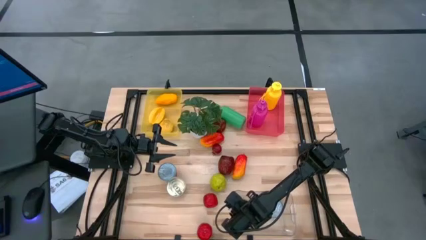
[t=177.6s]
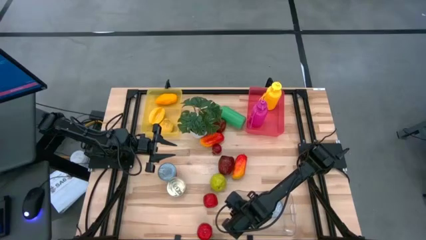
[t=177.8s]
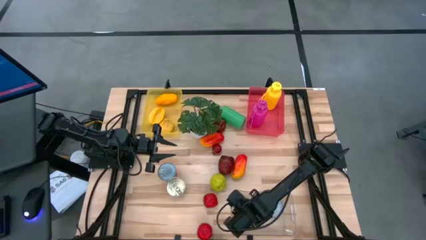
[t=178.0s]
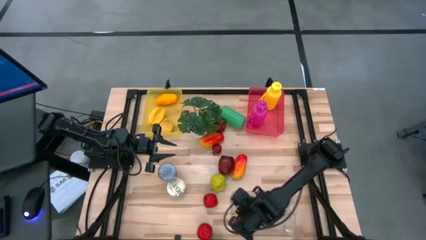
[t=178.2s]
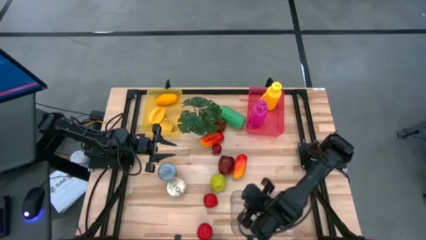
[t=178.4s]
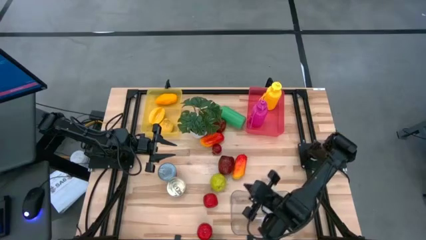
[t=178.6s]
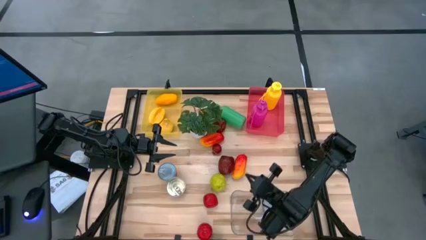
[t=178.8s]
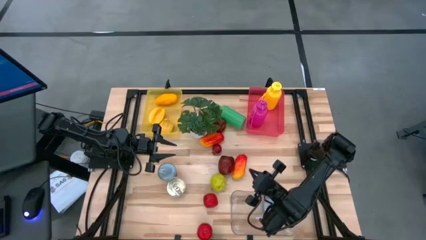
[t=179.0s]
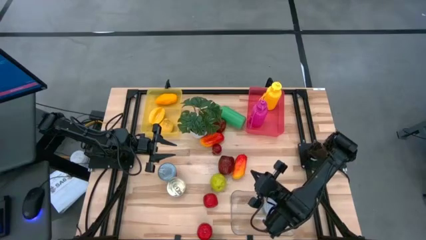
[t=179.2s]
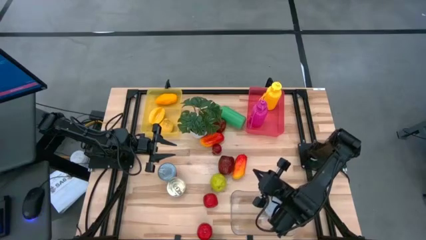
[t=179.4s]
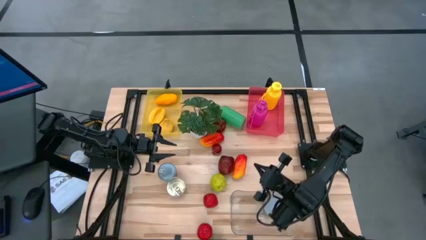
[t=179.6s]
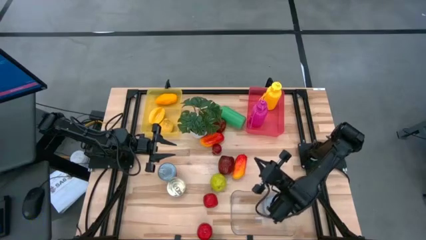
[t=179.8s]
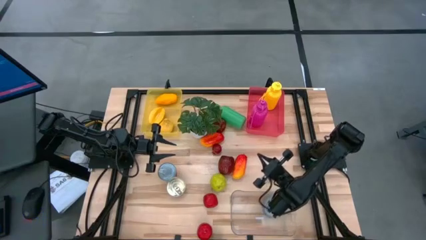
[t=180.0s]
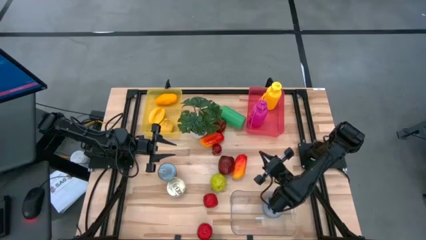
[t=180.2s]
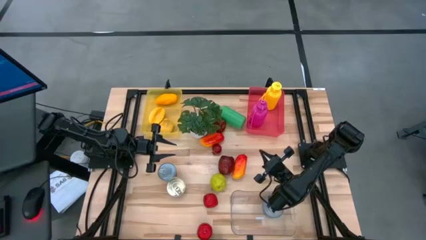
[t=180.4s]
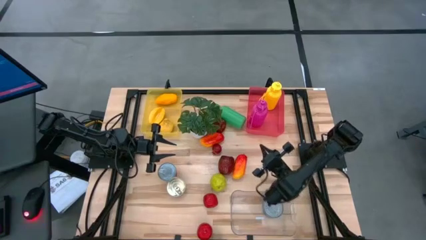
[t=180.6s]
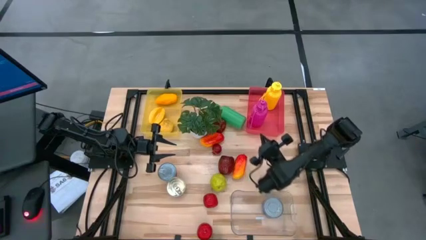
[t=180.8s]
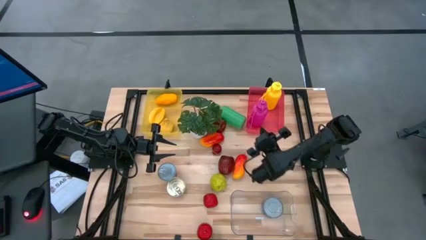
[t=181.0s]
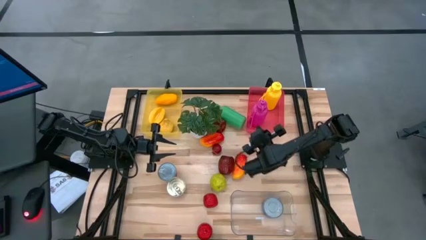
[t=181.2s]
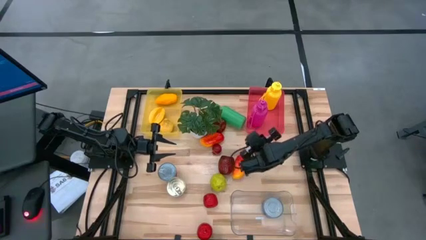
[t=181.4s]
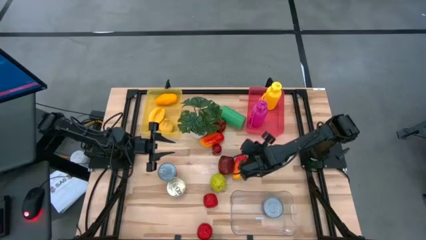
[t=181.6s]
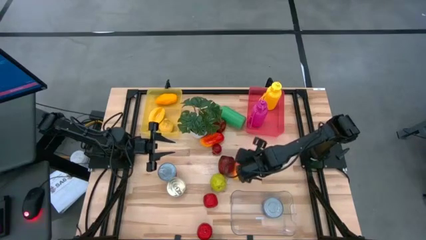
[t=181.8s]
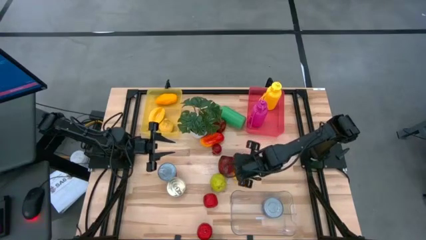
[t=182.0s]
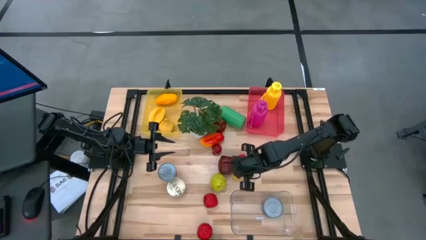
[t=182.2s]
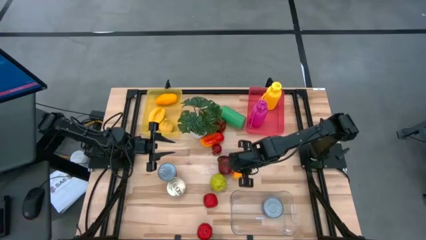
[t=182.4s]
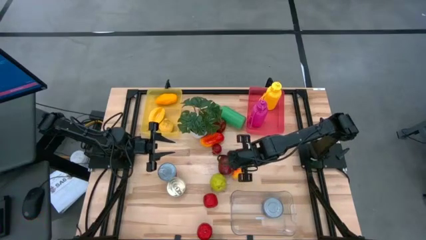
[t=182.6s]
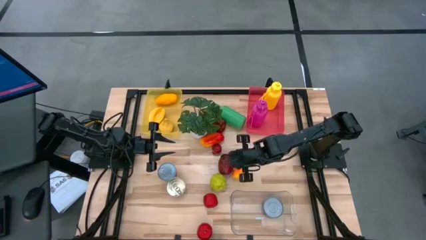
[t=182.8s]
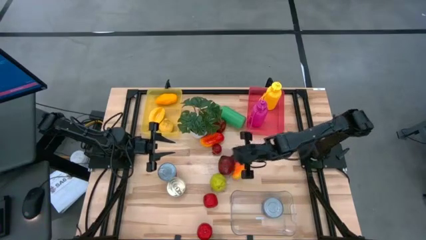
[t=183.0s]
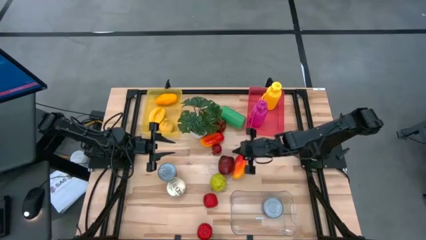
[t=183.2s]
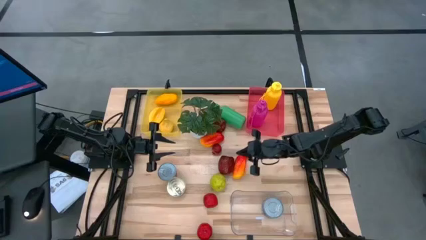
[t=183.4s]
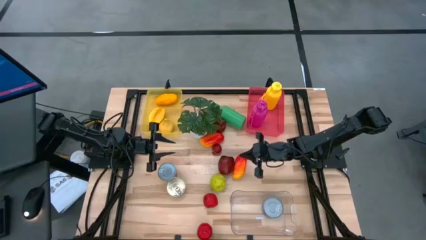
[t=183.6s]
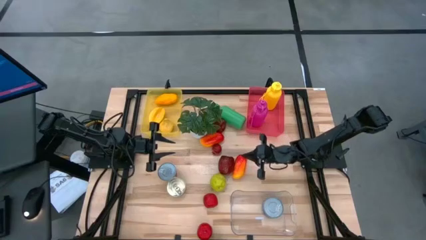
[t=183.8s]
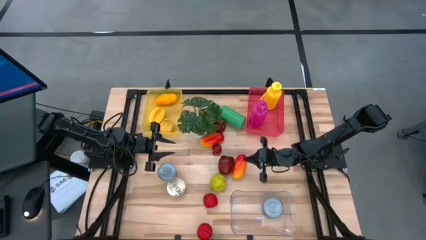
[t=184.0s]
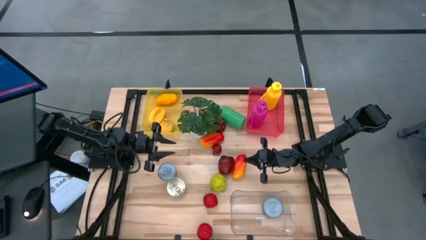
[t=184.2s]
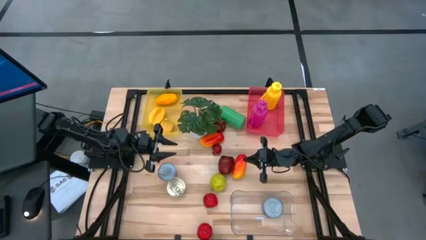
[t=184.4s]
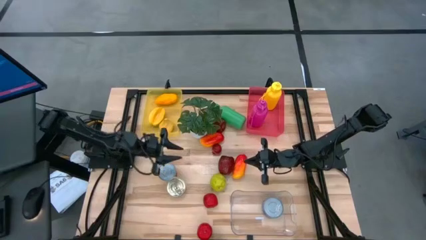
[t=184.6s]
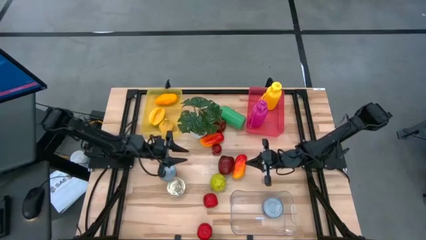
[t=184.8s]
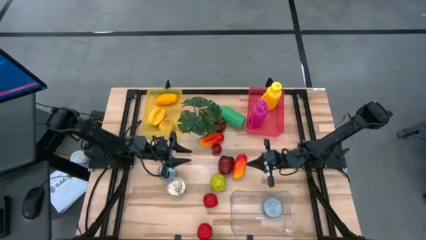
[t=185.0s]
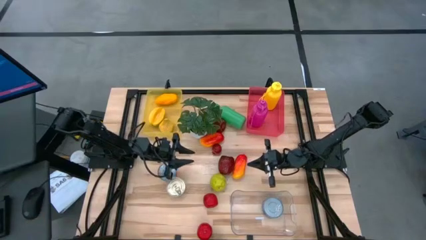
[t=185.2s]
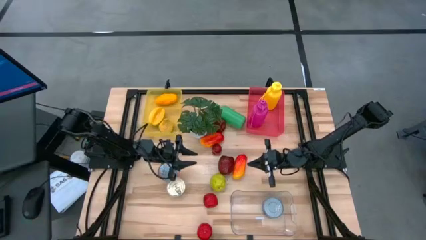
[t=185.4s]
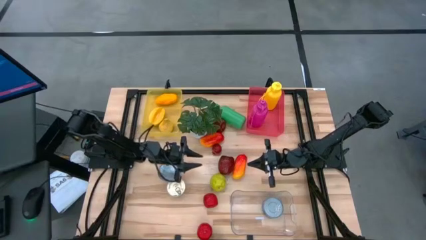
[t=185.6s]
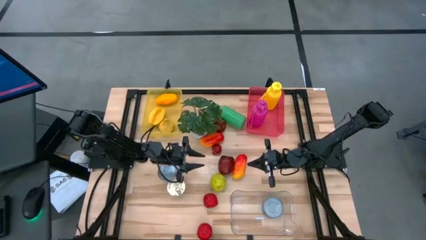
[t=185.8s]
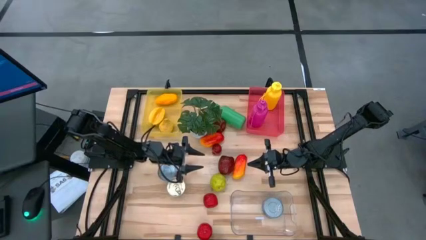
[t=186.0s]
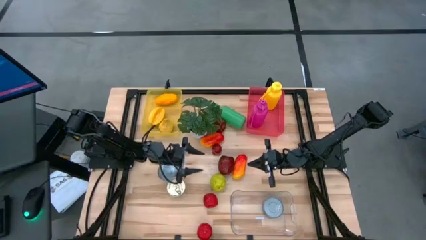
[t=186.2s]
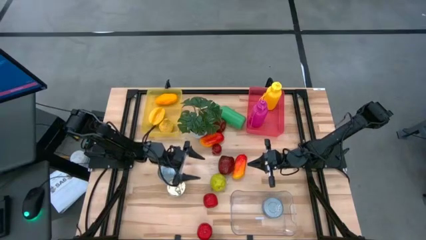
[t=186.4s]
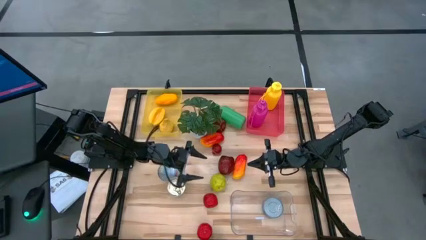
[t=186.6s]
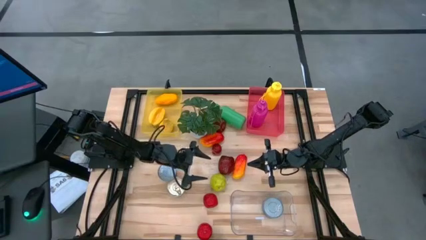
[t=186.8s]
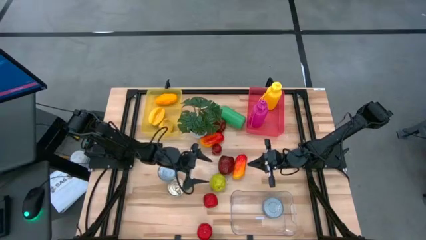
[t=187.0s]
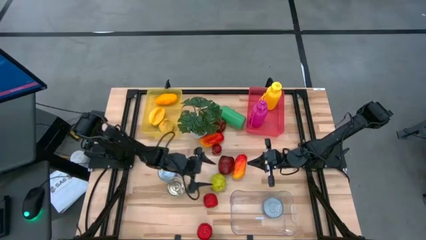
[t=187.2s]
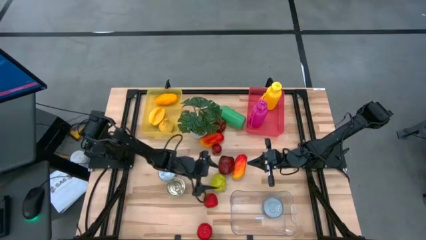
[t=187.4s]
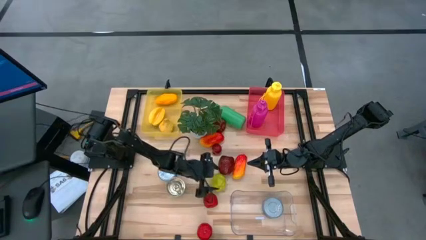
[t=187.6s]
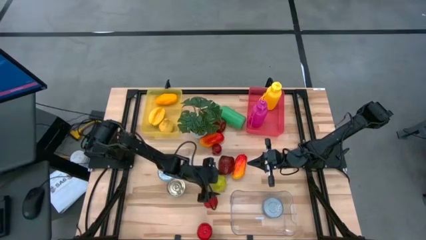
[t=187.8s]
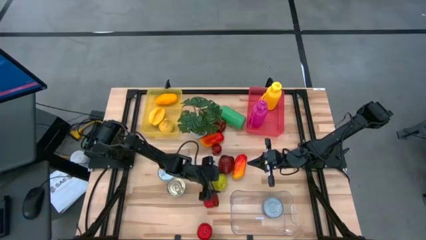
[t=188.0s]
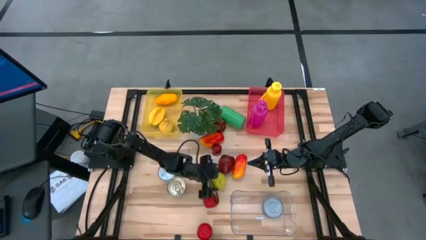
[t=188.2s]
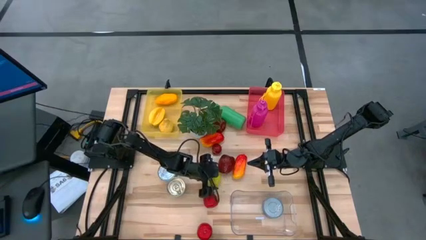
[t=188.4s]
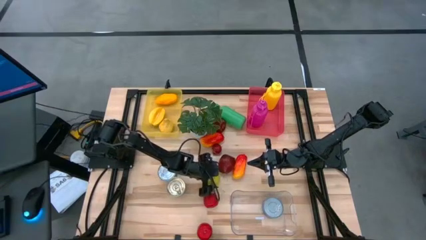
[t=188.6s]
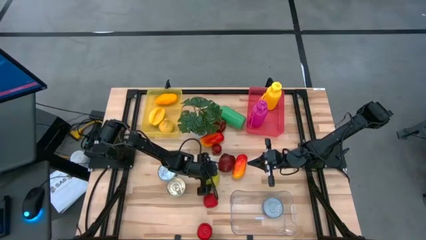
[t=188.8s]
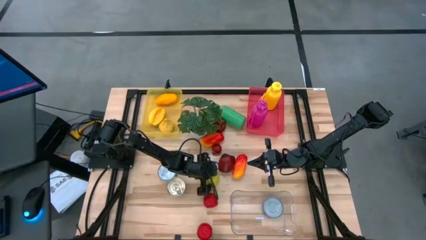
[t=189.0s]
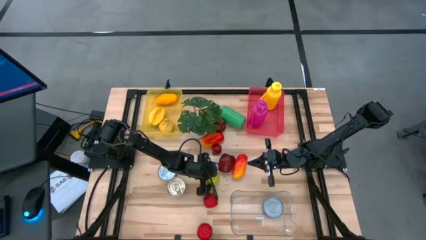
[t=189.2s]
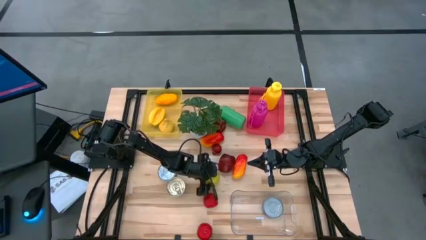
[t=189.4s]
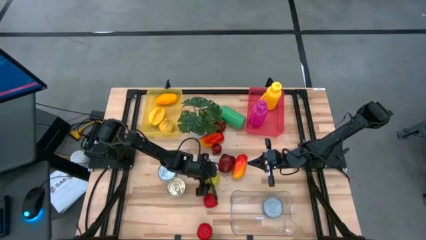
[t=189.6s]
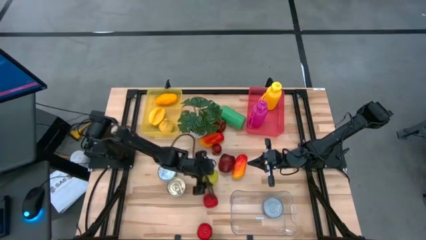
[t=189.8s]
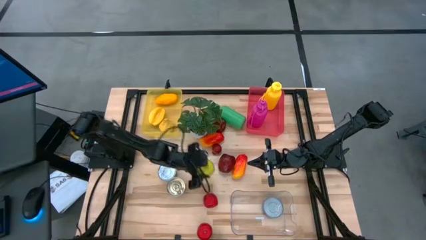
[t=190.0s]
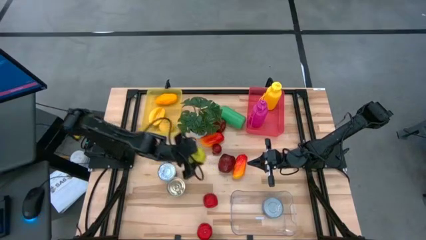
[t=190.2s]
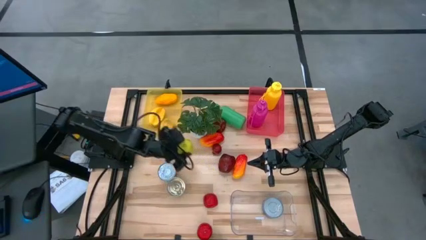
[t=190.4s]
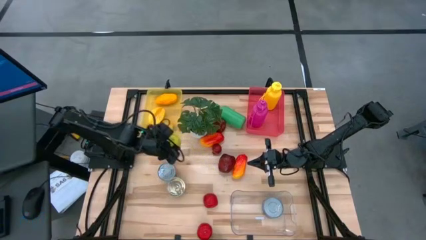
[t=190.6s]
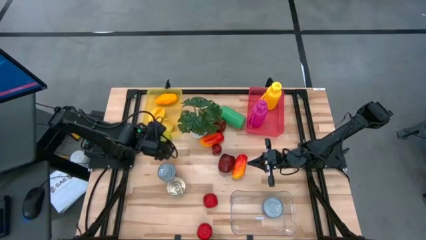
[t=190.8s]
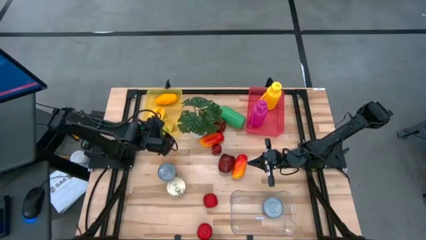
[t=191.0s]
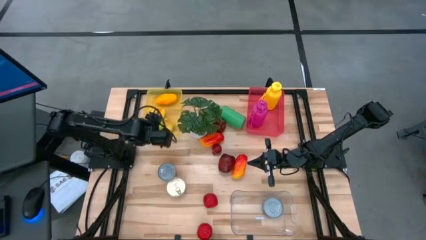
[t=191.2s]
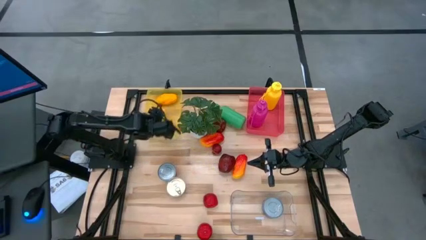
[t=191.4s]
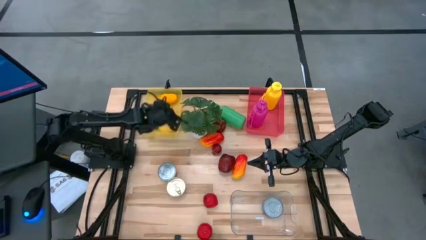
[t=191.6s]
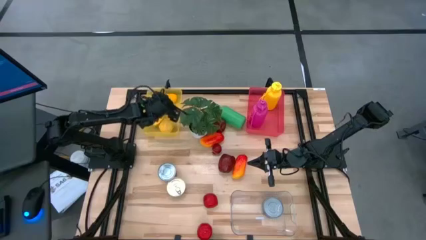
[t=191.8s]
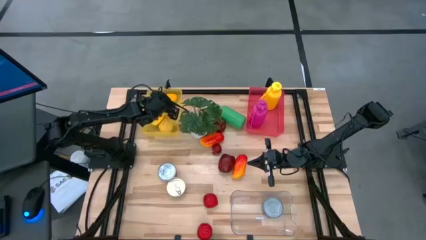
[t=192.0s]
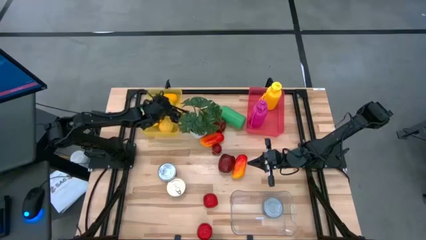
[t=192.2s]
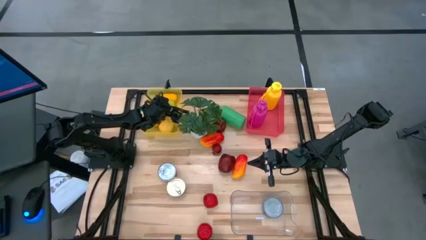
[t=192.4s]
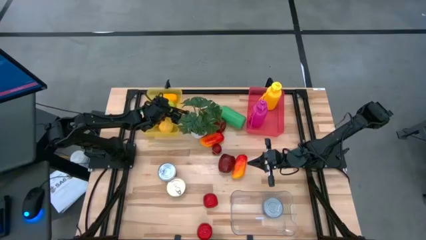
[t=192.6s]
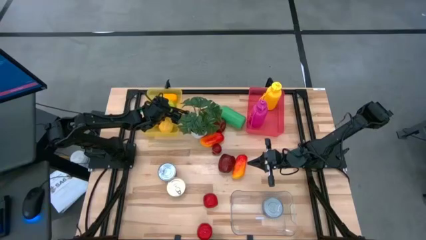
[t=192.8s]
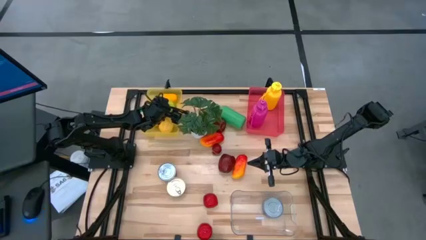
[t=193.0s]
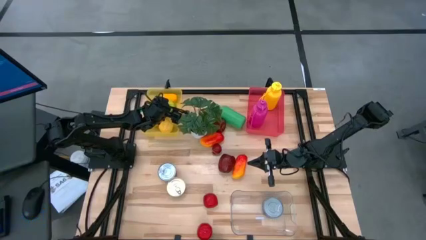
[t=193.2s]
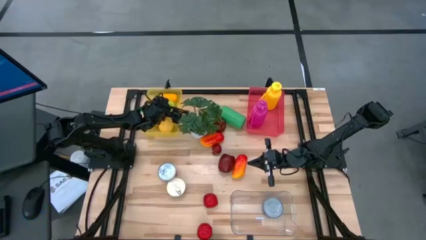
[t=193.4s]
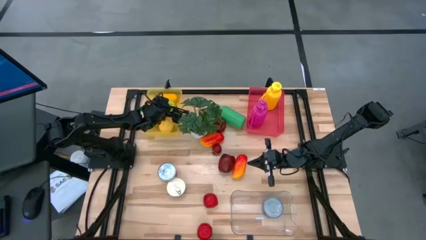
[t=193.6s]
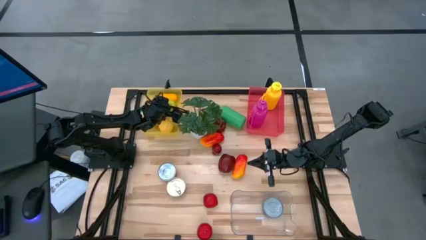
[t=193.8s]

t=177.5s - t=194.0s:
Task: Pick & Place Food Item
Put the green apple into the yellow bin
